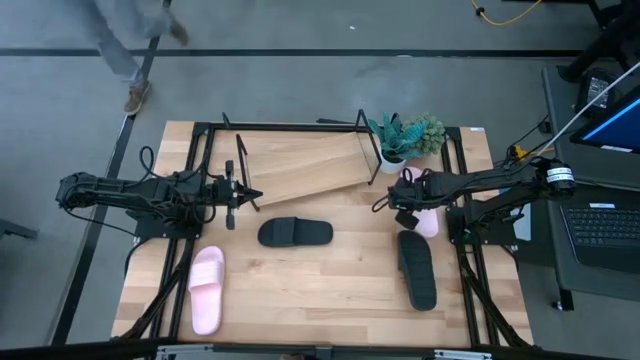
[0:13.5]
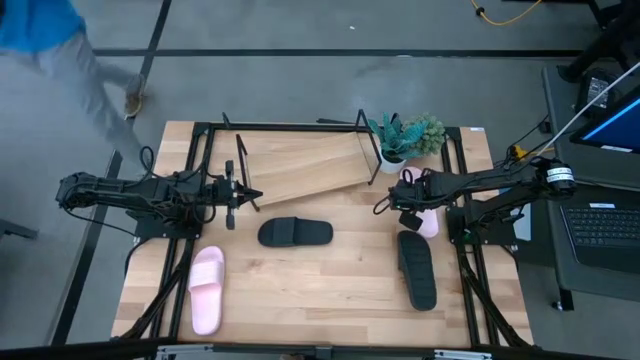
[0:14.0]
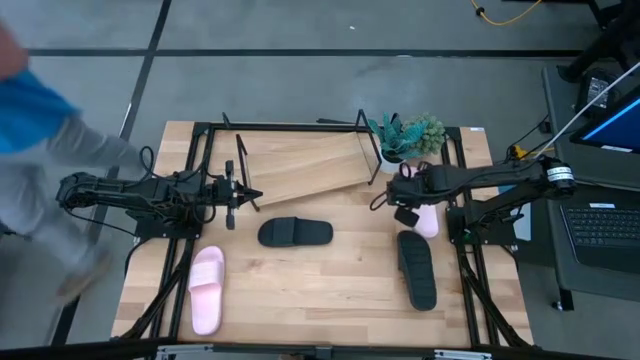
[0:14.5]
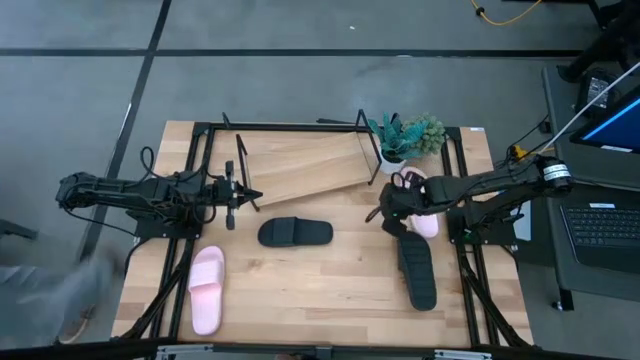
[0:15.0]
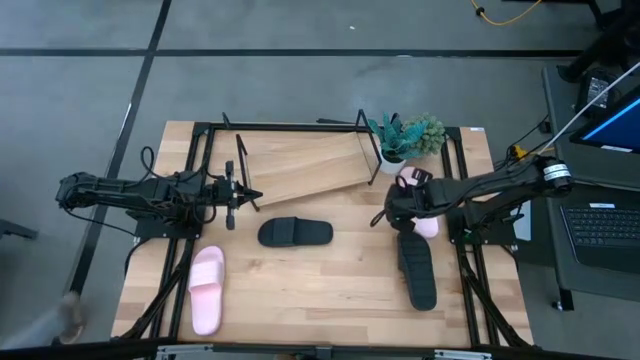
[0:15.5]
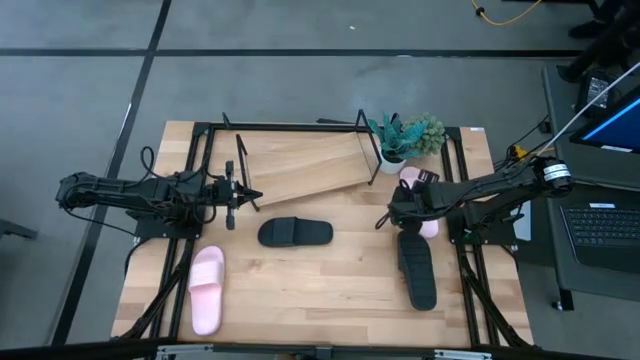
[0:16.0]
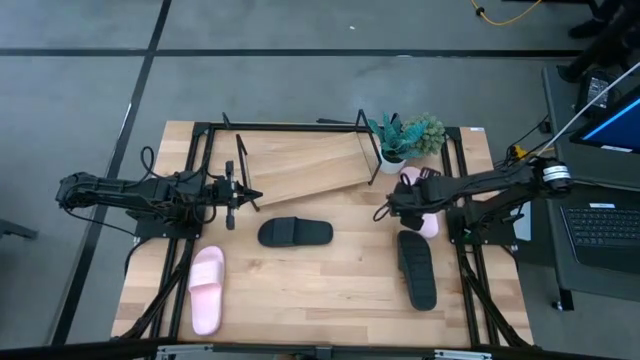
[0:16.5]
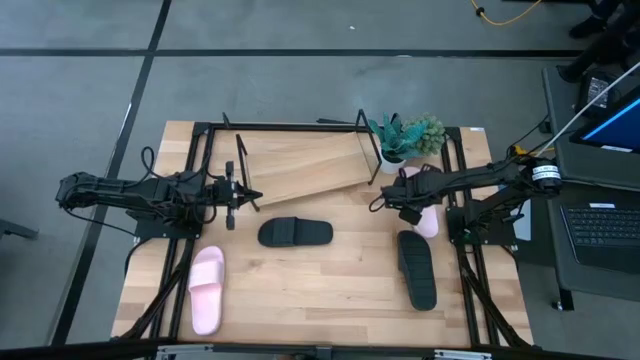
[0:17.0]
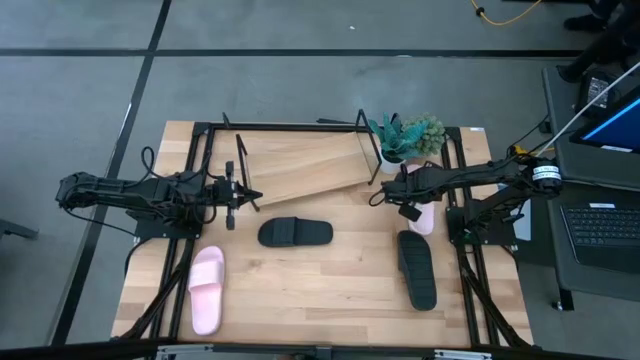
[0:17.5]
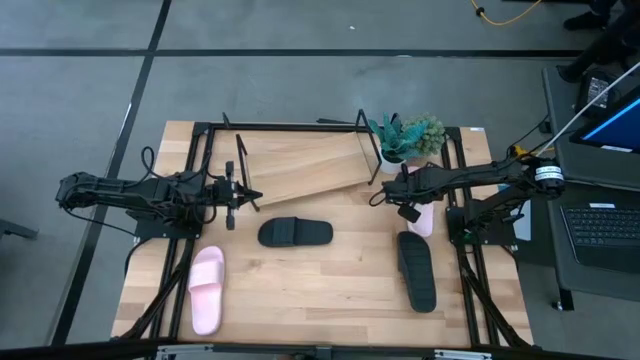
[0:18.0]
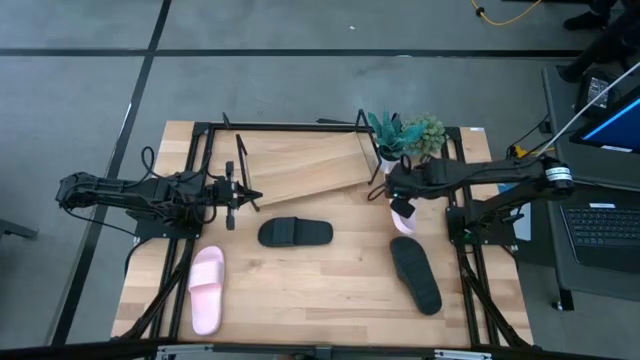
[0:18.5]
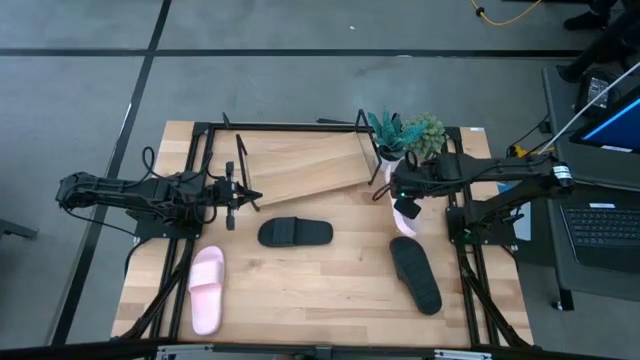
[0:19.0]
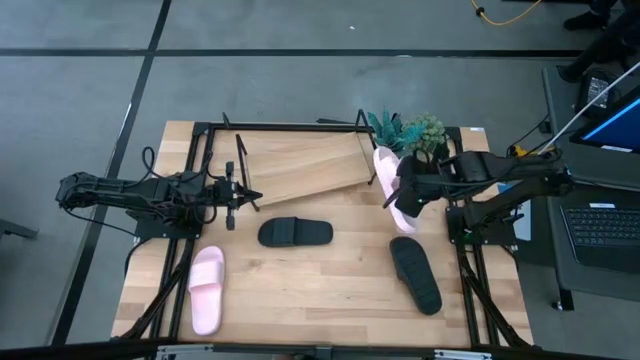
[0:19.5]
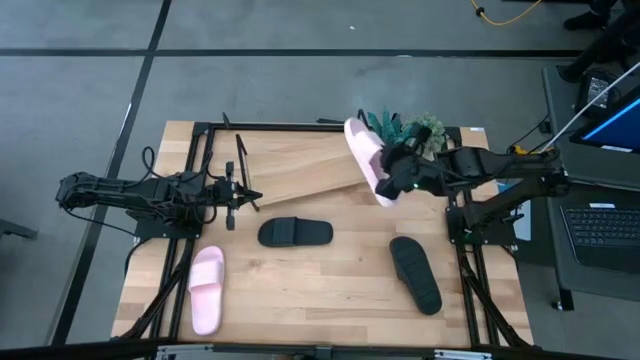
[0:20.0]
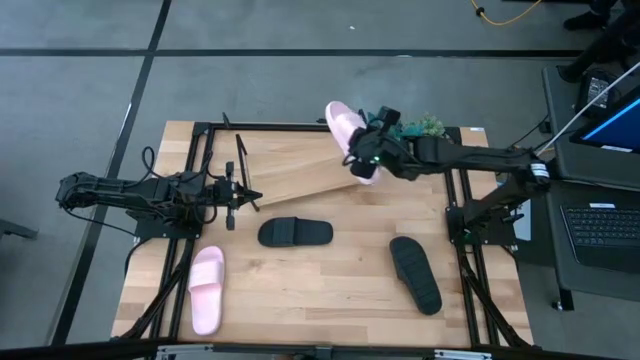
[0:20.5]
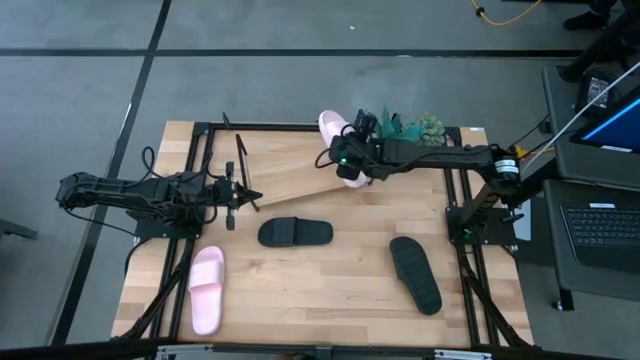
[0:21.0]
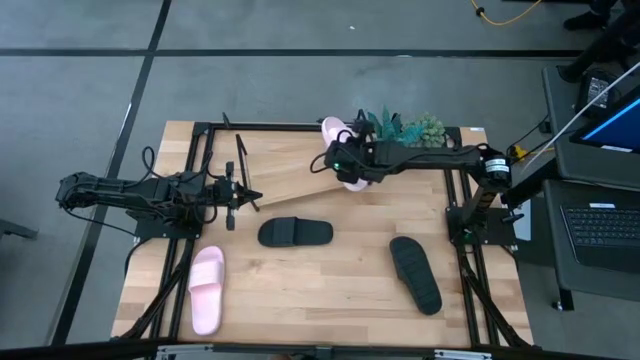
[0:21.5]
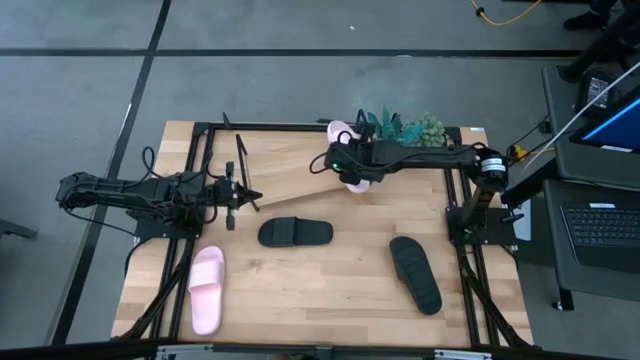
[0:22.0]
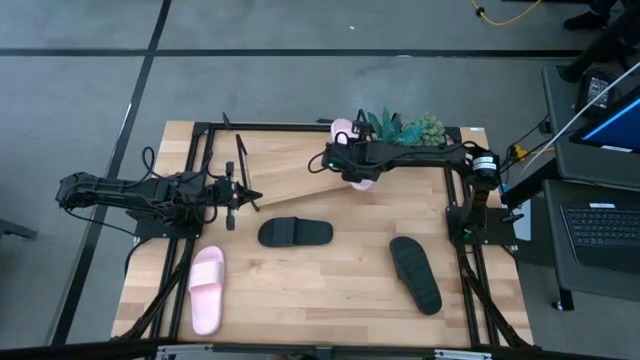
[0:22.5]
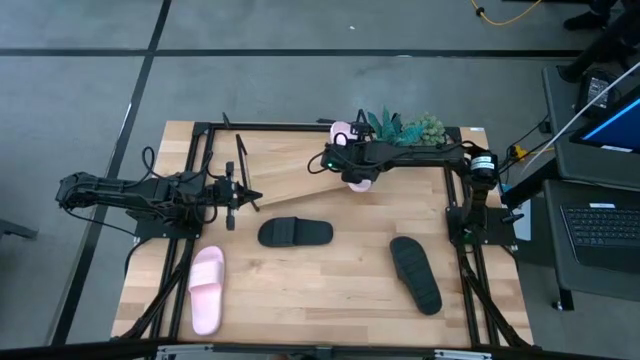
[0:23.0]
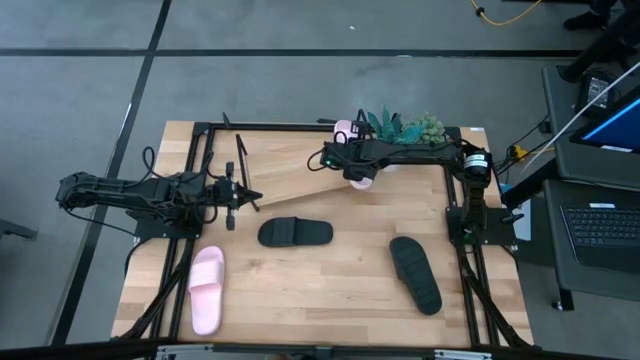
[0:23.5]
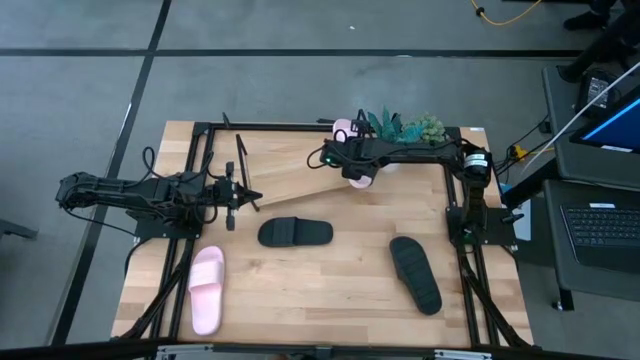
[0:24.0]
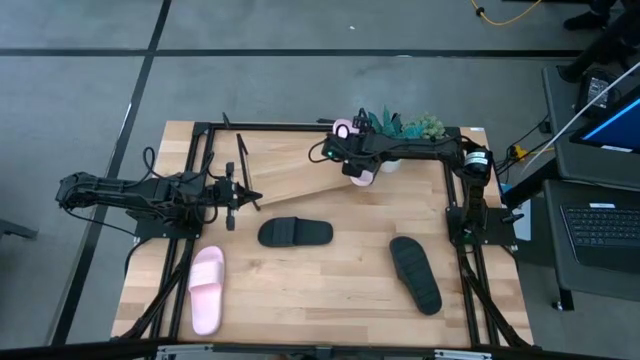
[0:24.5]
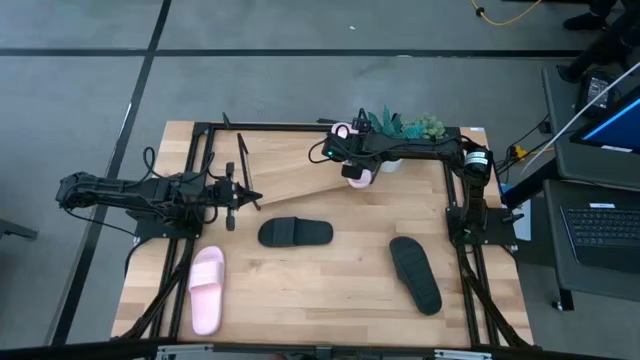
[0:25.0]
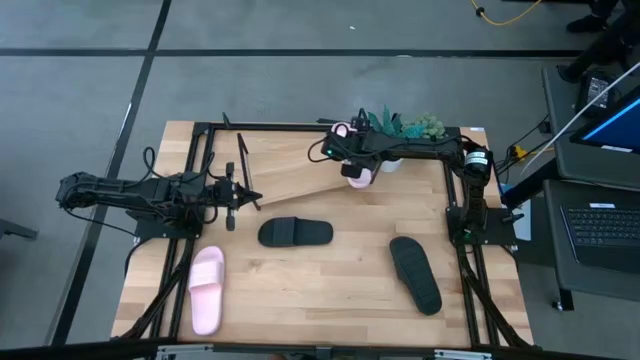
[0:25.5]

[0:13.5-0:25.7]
Task: Pick and place slides into the shelf
Put the top pink slide on the shelf

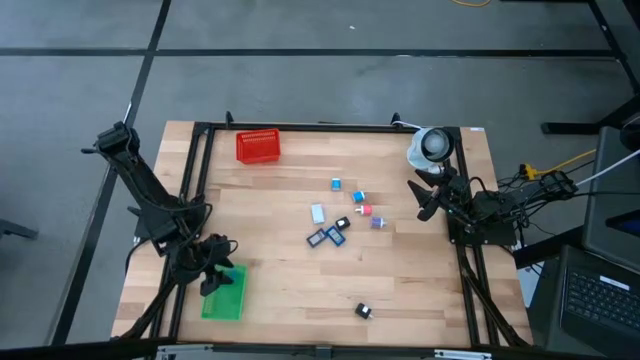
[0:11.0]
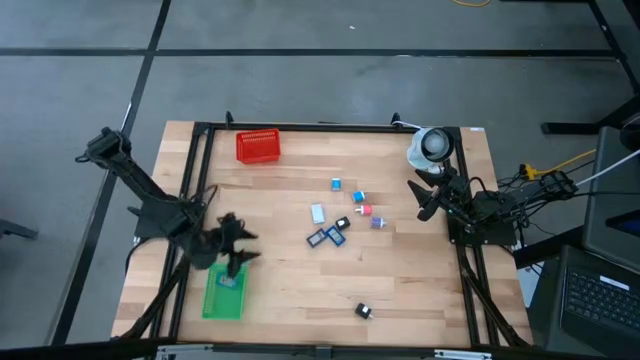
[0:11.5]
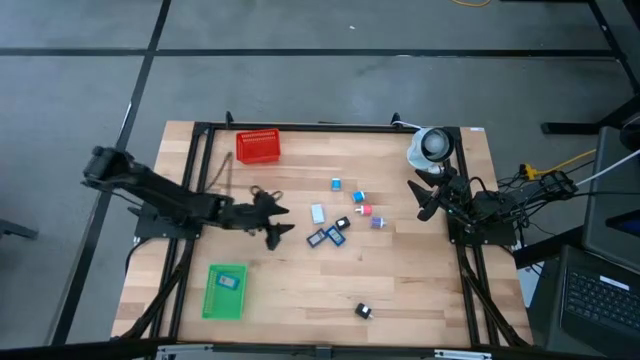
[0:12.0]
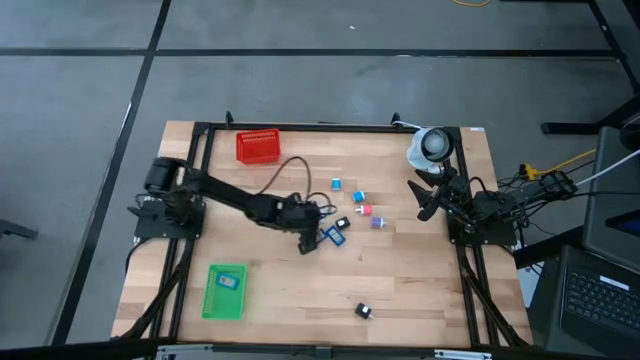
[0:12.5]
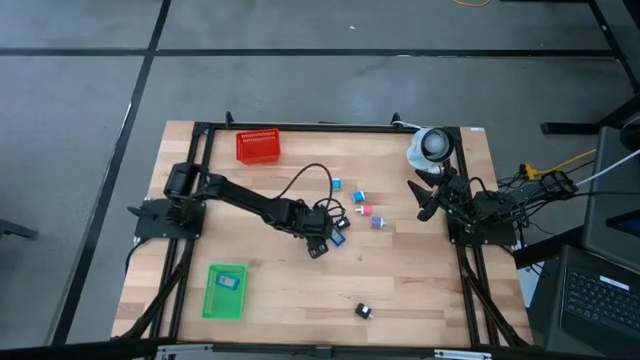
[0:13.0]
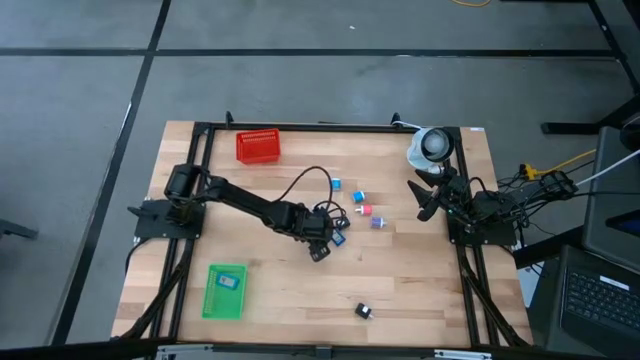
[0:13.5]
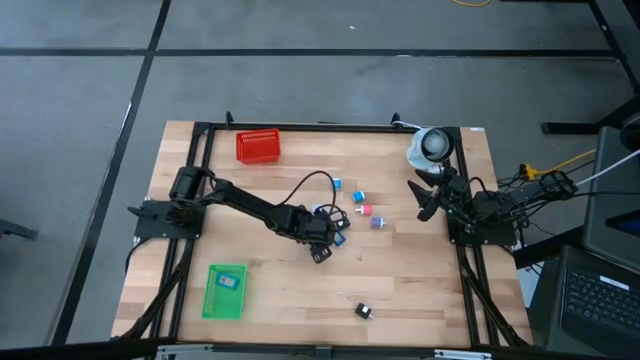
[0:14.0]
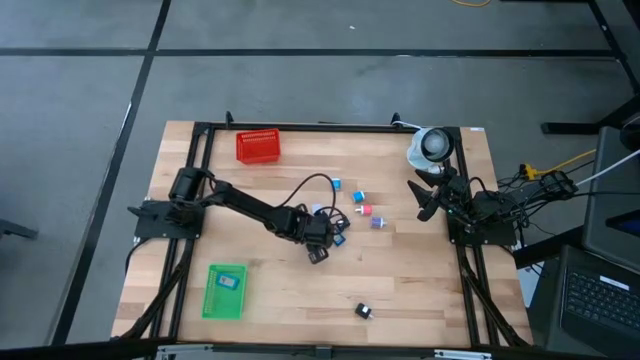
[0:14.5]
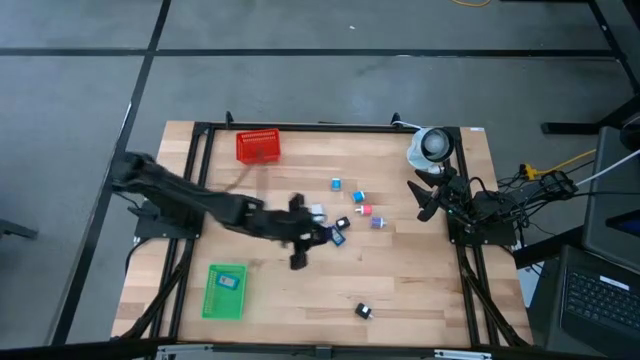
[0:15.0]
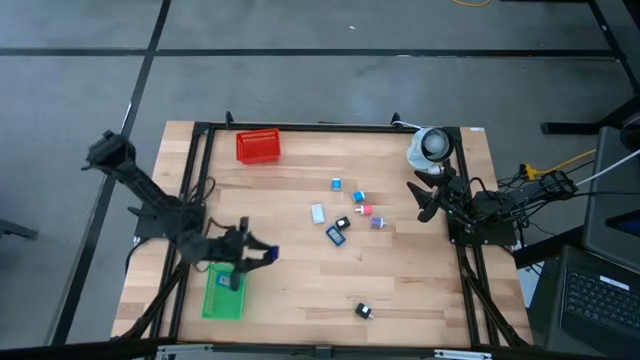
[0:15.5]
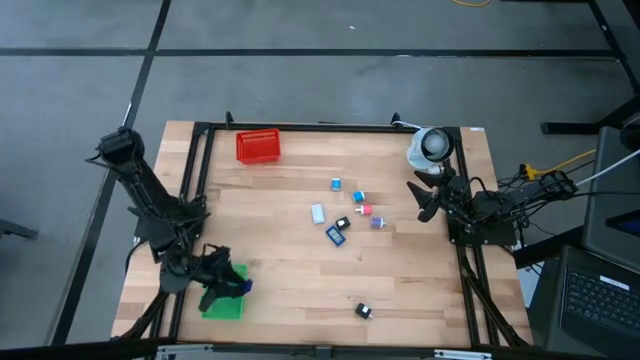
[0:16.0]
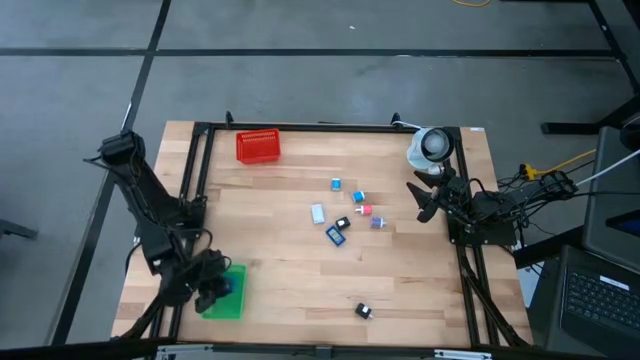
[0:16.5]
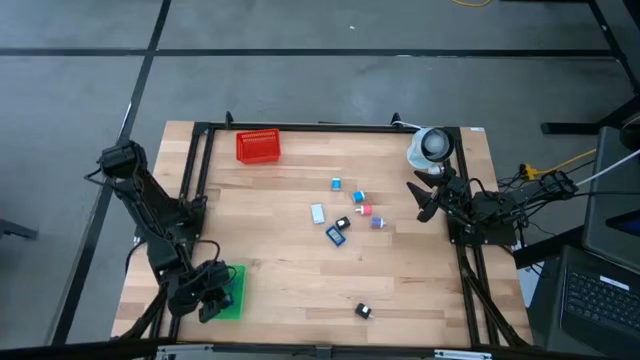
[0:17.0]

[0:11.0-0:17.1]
Task: Pick & Place Office items
Put the blue digital timer into the green bin
